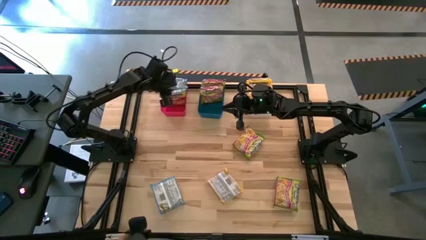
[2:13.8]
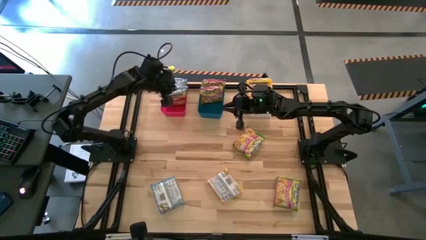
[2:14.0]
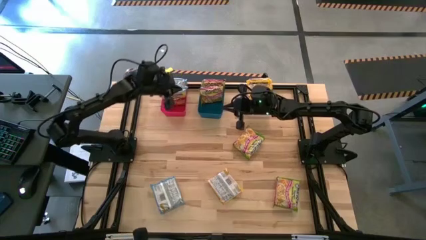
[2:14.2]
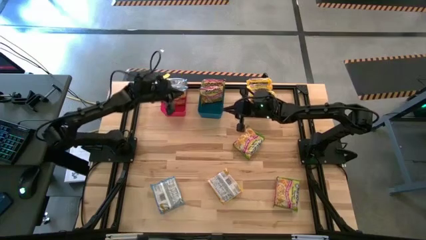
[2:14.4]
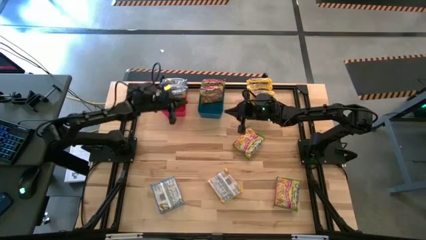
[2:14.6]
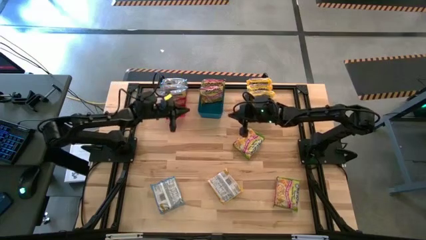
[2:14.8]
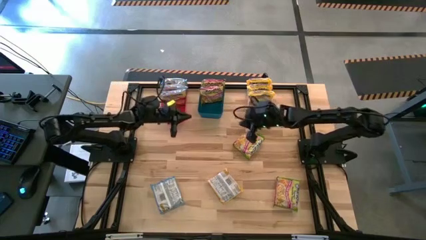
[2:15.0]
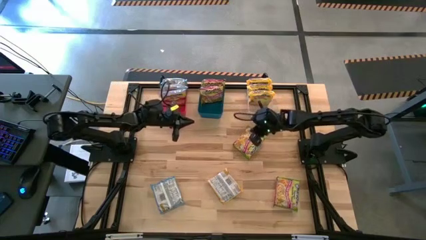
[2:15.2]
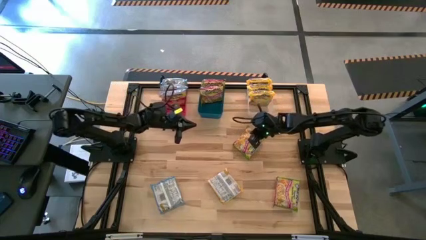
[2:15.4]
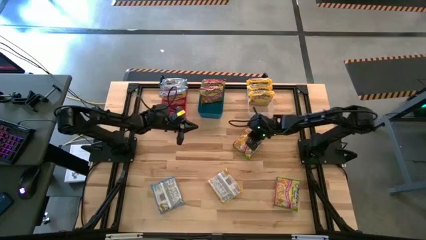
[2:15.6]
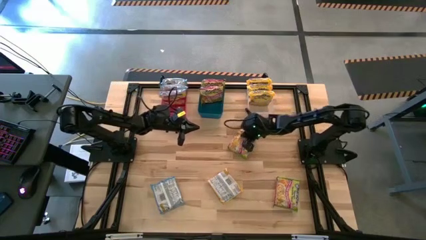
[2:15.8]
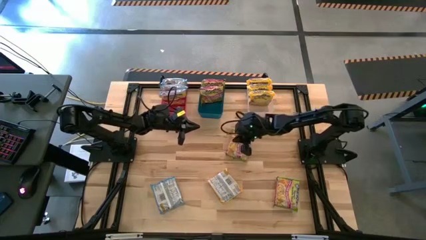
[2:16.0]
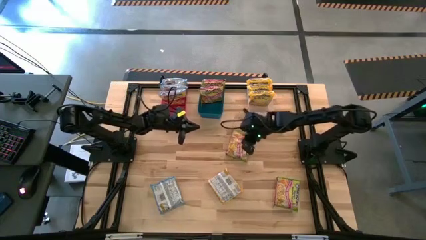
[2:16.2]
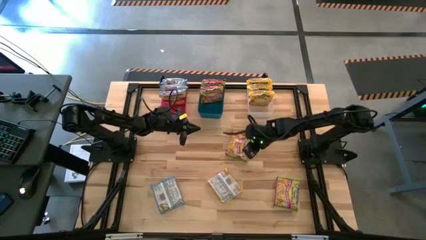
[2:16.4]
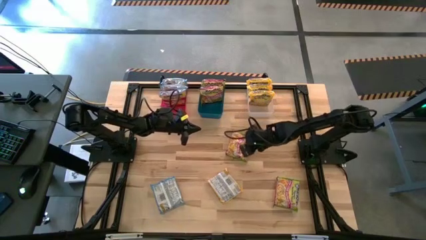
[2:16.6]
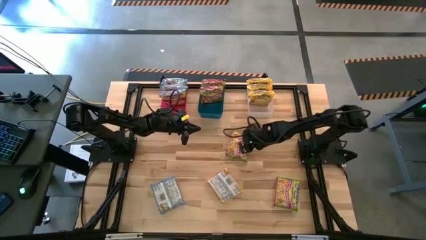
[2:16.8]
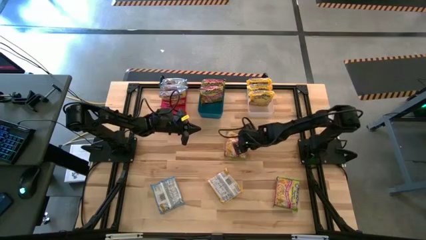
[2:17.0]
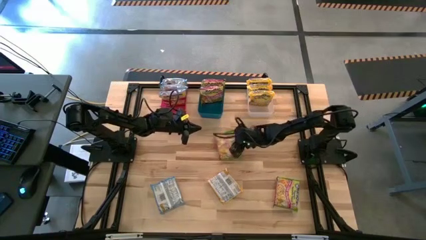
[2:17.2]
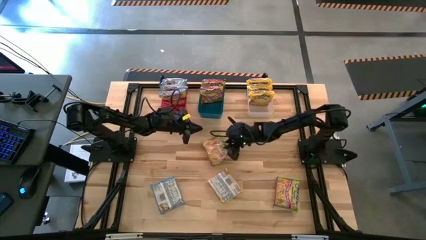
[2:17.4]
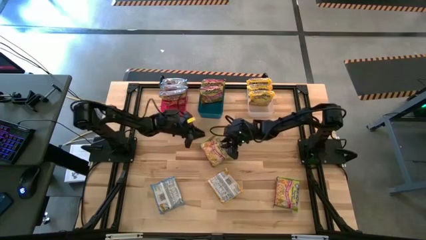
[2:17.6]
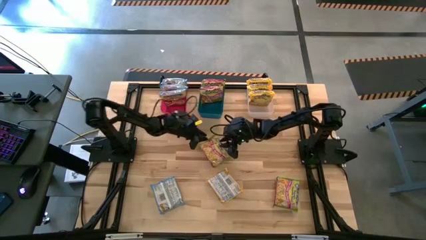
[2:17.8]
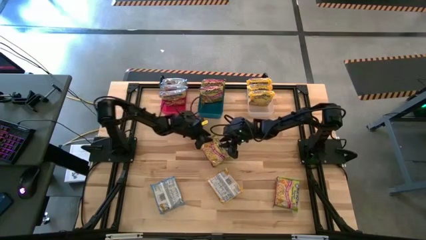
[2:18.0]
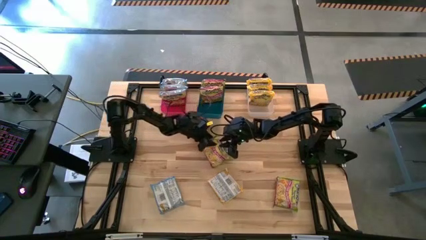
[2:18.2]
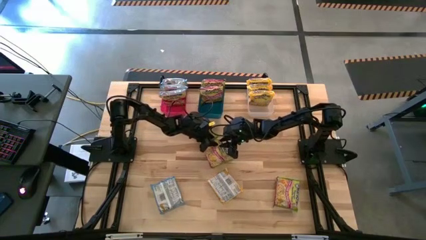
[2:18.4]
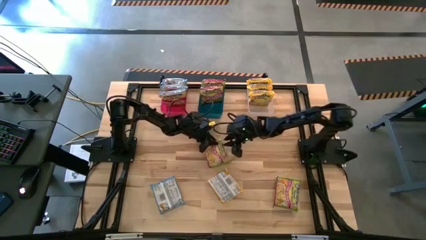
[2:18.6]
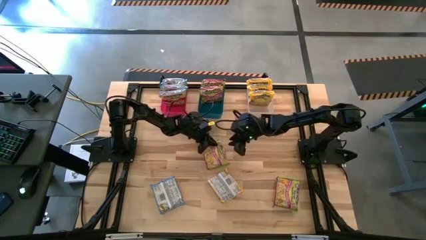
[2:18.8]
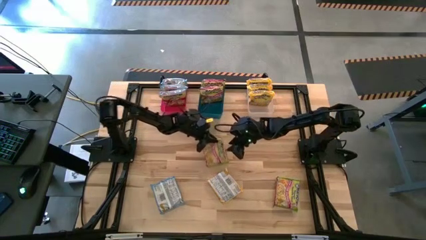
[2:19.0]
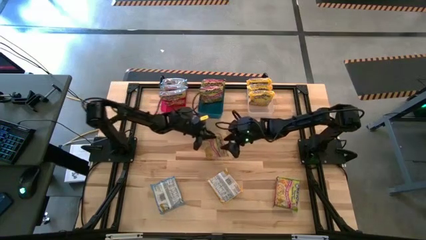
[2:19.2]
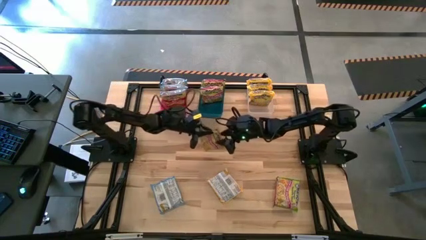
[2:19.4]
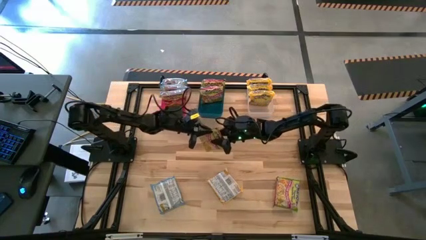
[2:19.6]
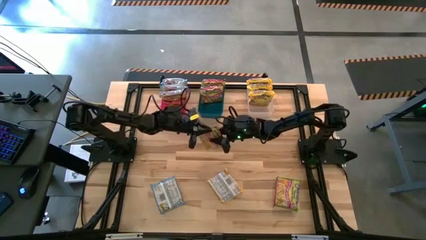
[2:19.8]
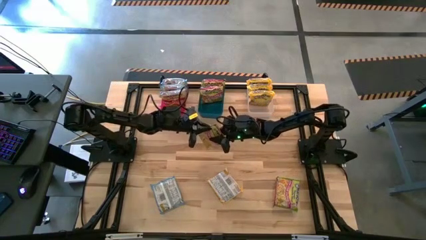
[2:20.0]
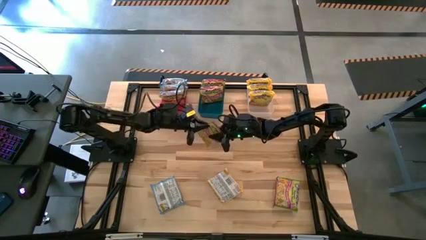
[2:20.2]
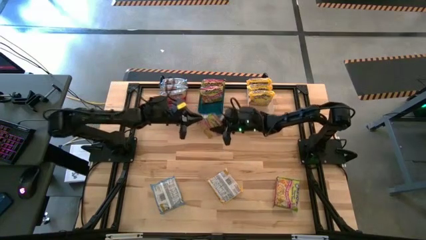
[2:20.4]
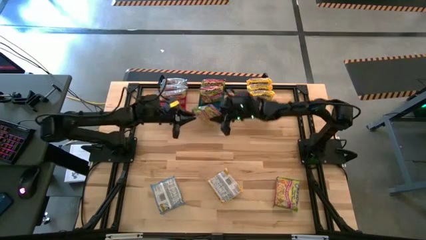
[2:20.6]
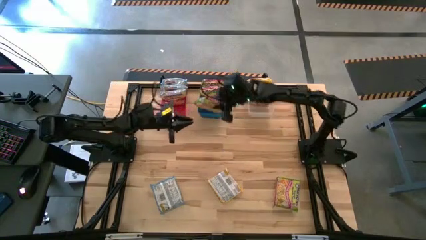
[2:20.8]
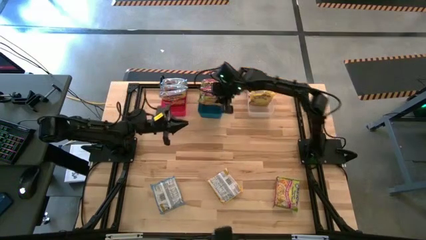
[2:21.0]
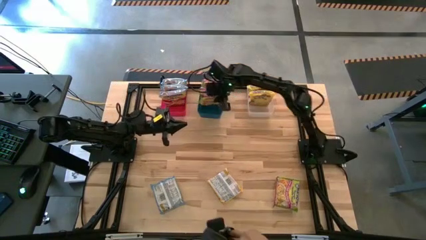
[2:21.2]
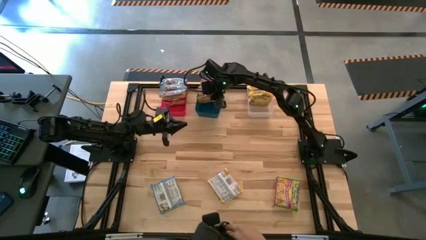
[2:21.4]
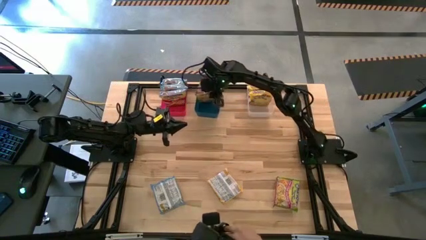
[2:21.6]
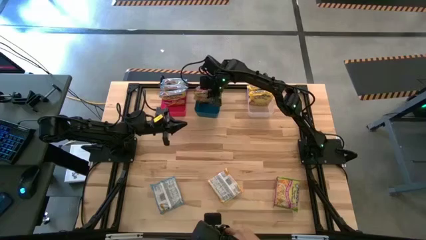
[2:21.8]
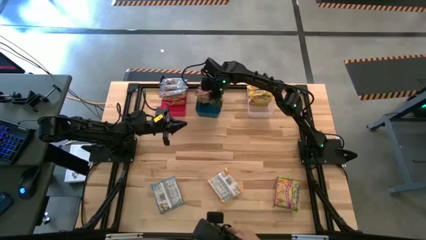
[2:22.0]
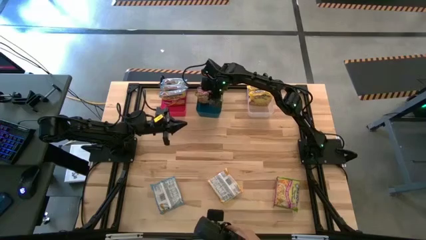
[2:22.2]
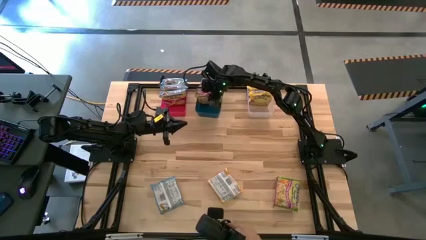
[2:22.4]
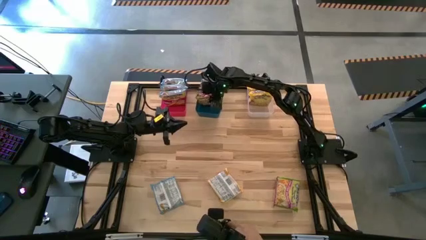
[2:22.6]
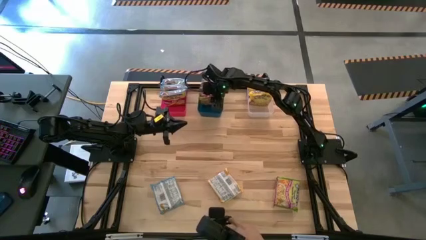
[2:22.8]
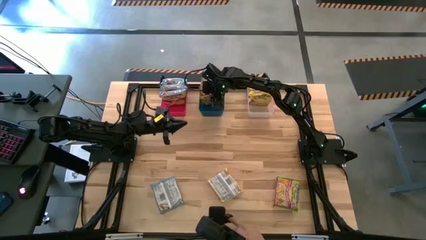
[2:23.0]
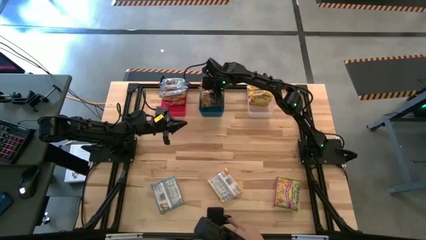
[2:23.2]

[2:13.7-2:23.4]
Task: Sort Maruchan noodles
Put the top green noodle pack into the blue bin

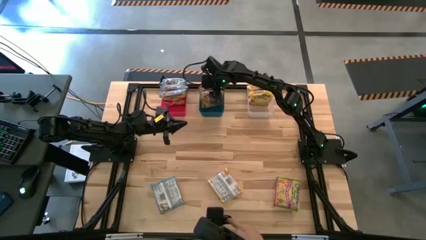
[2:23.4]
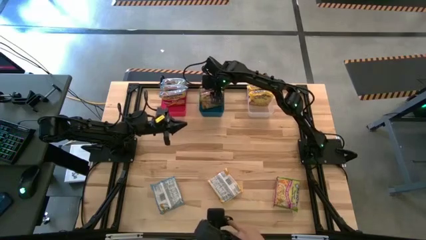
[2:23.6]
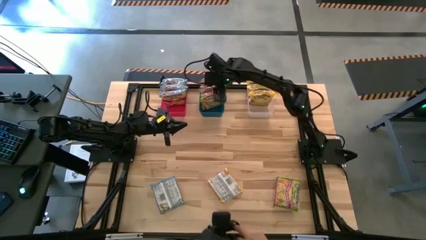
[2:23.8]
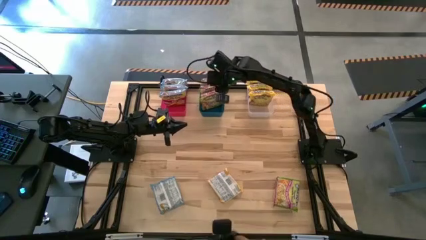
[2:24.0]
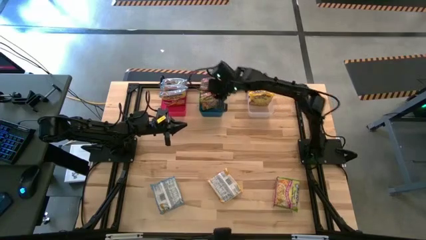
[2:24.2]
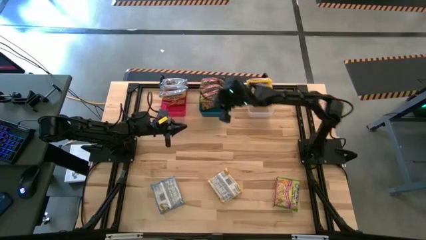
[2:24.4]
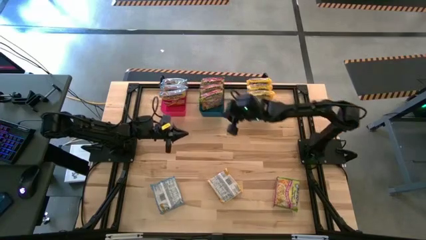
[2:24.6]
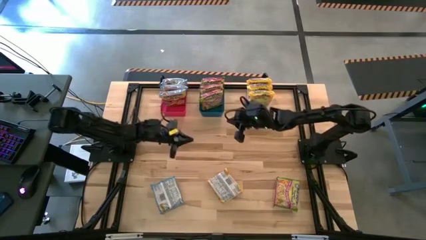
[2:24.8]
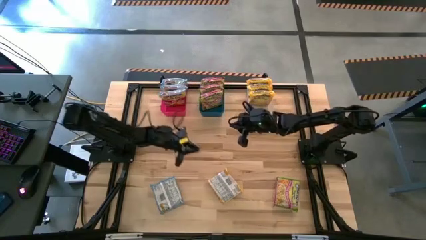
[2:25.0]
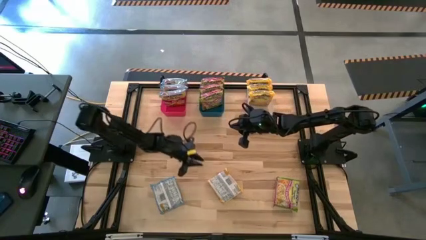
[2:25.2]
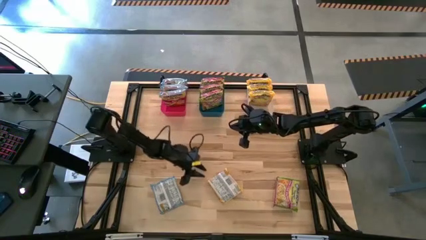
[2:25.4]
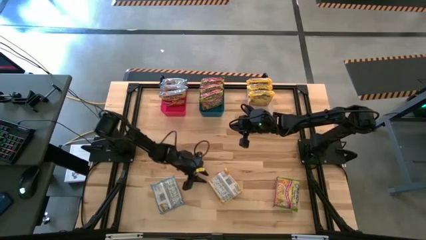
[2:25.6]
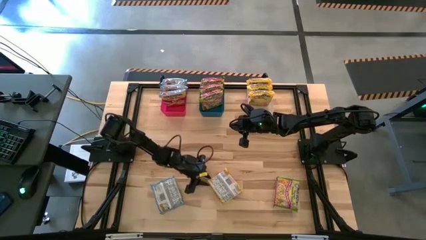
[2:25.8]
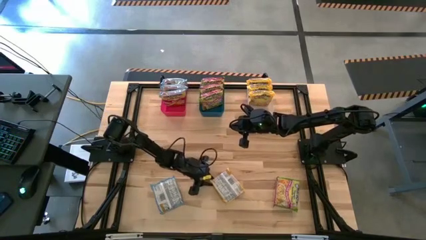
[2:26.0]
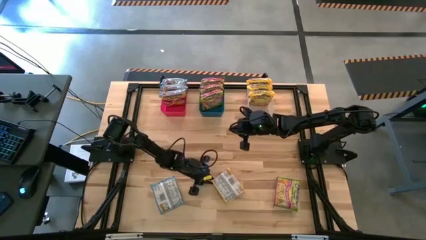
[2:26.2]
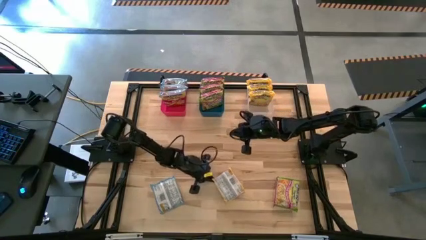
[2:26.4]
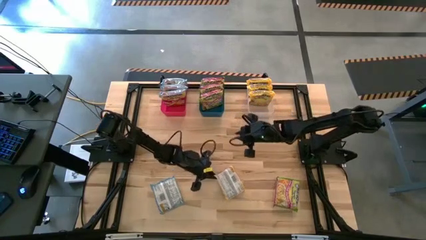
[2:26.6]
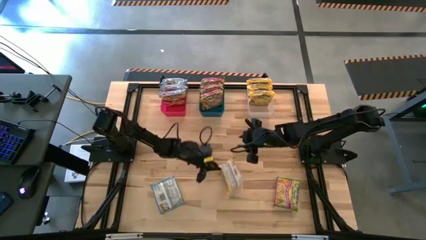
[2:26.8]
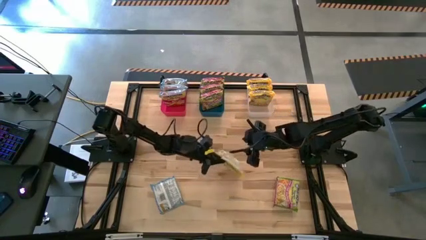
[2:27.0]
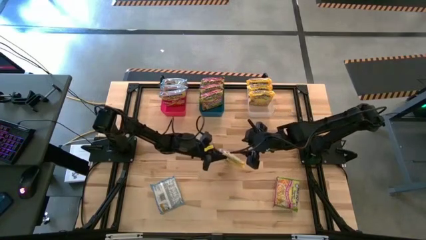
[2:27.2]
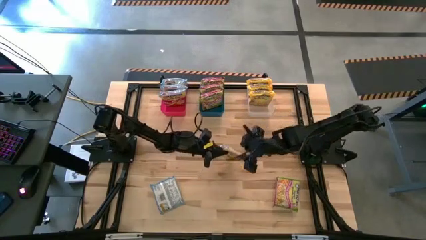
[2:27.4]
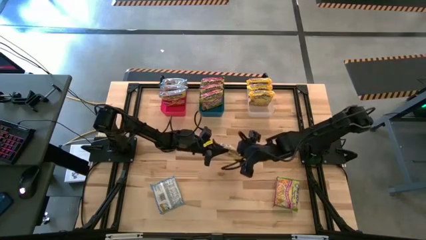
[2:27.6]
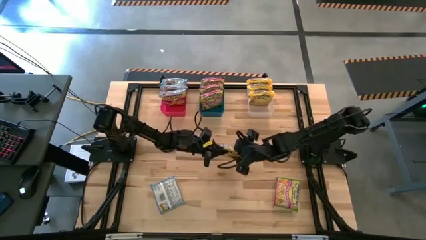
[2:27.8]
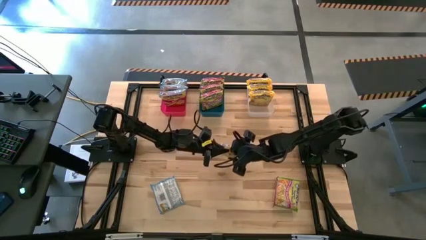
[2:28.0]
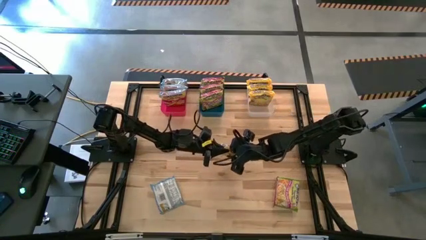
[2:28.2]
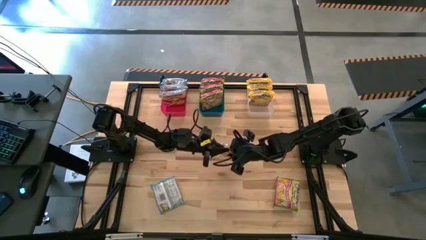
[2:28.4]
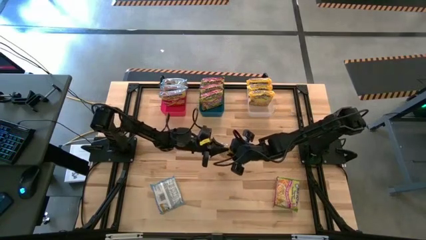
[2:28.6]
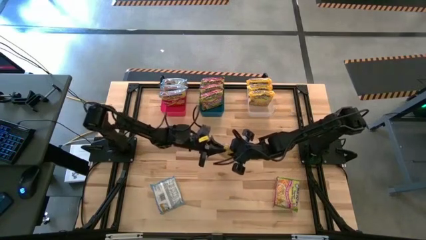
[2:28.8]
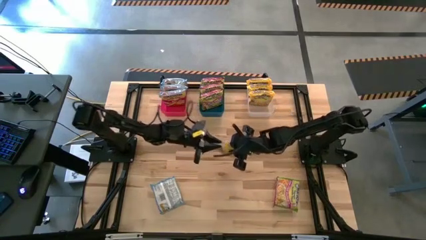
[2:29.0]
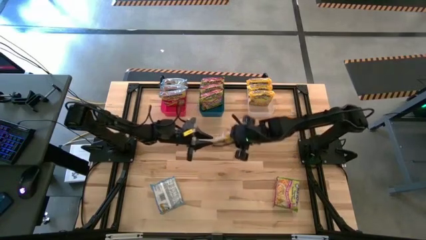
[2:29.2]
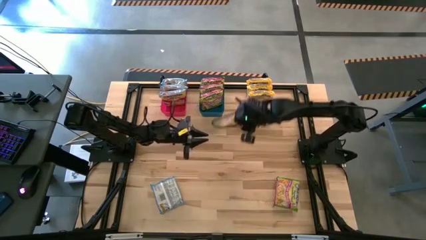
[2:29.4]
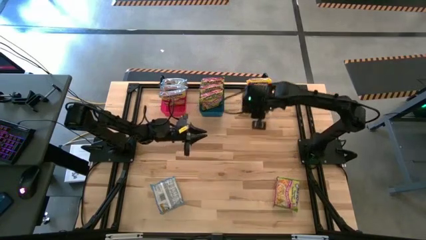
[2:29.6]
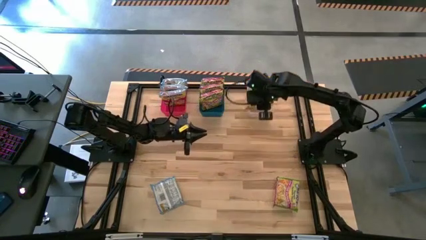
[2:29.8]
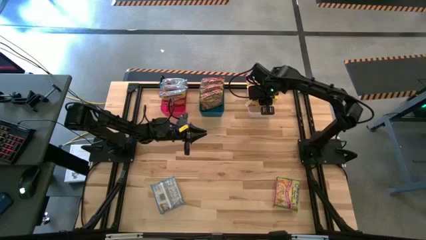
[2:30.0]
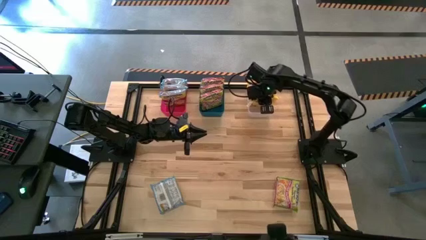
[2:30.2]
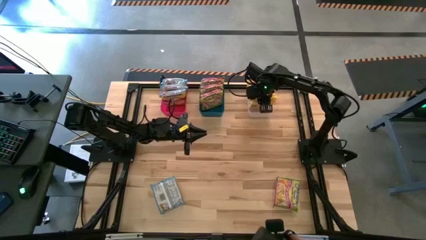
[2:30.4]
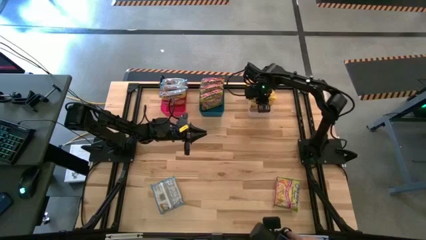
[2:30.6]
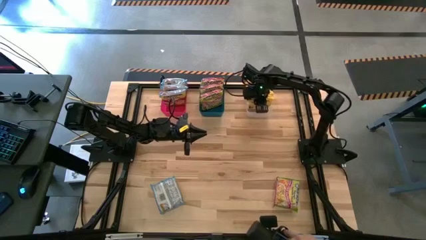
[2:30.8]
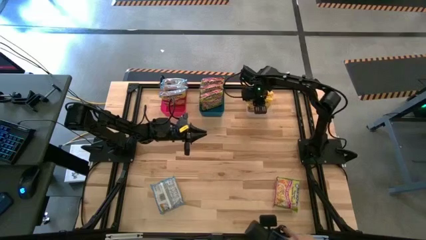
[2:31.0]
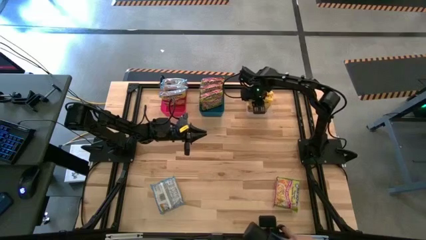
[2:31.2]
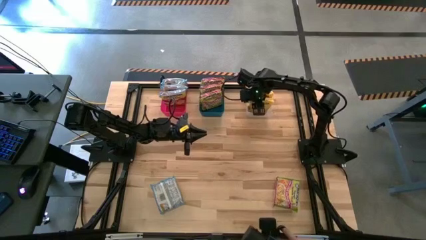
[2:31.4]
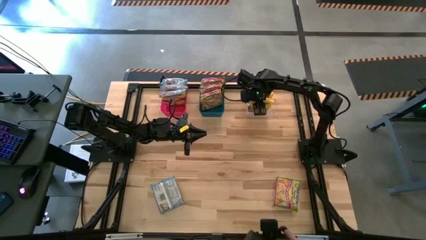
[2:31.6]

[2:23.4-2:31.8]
Put the yellow noodle pack into the transparent bin
